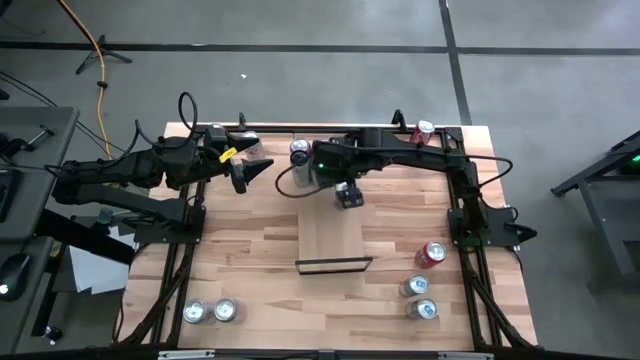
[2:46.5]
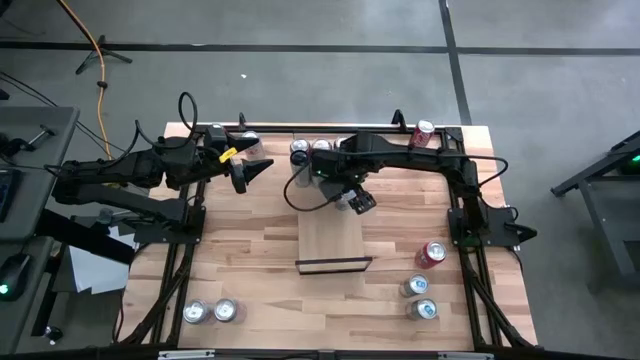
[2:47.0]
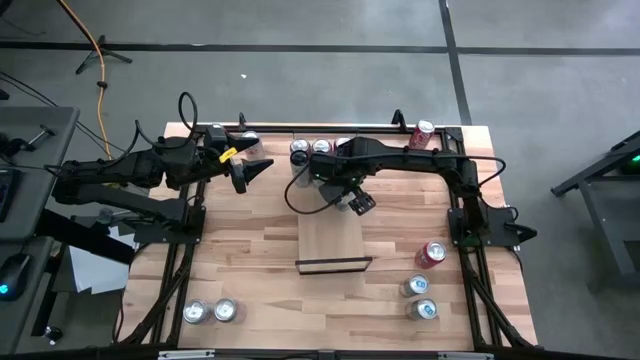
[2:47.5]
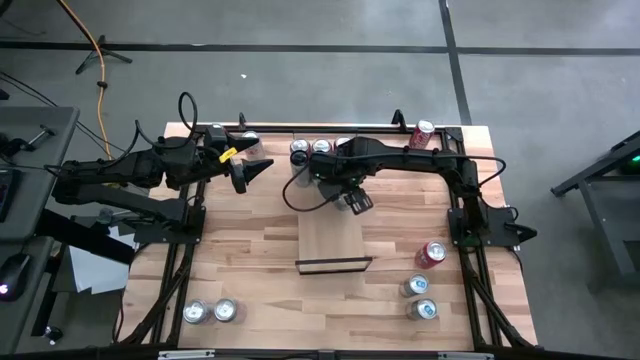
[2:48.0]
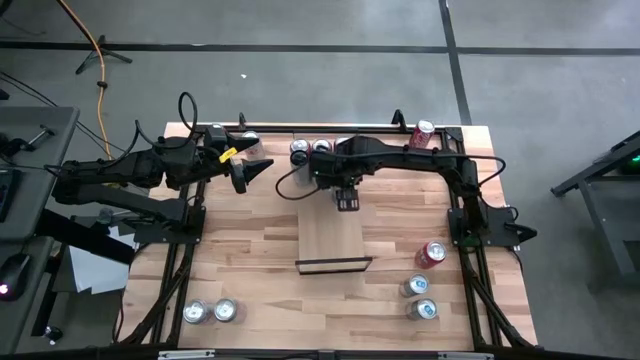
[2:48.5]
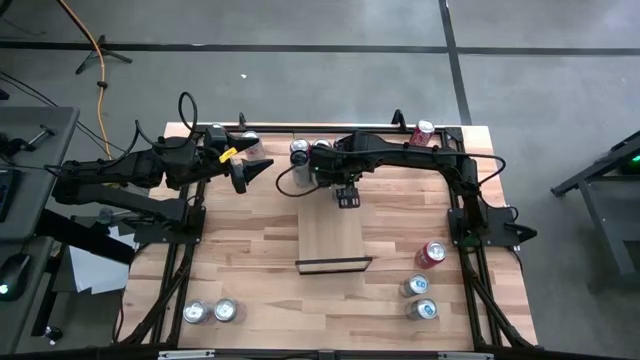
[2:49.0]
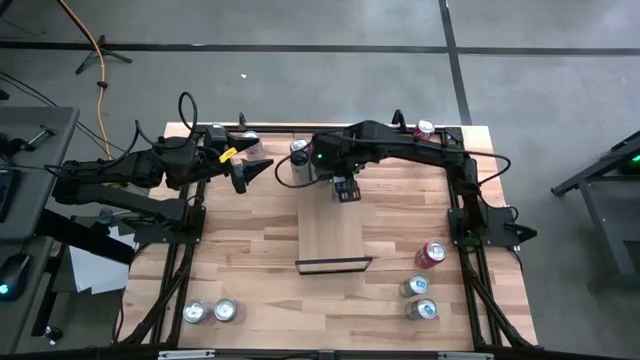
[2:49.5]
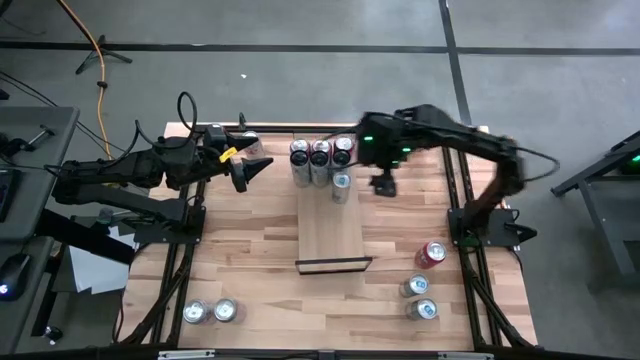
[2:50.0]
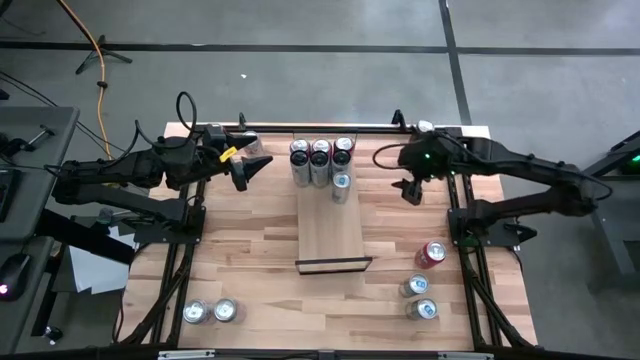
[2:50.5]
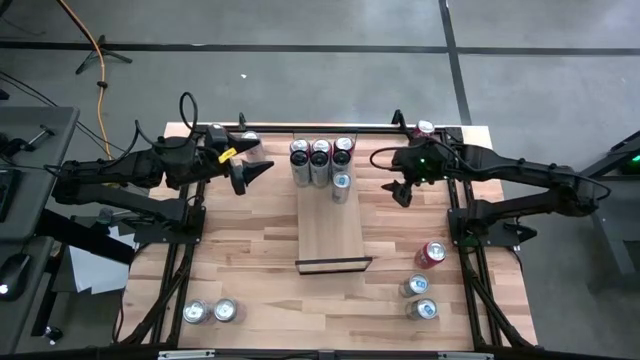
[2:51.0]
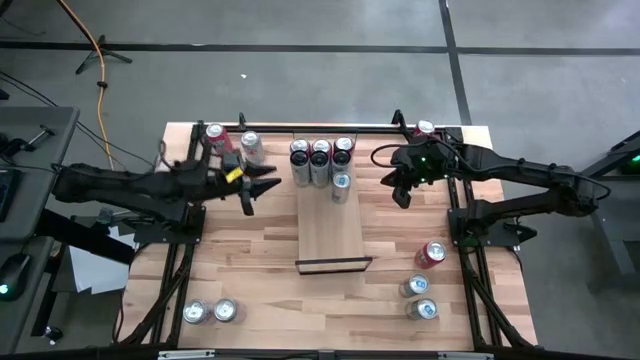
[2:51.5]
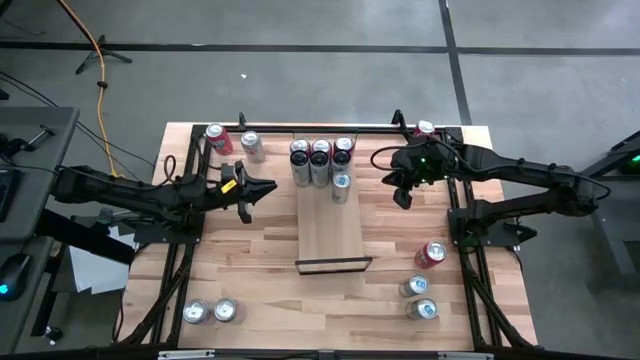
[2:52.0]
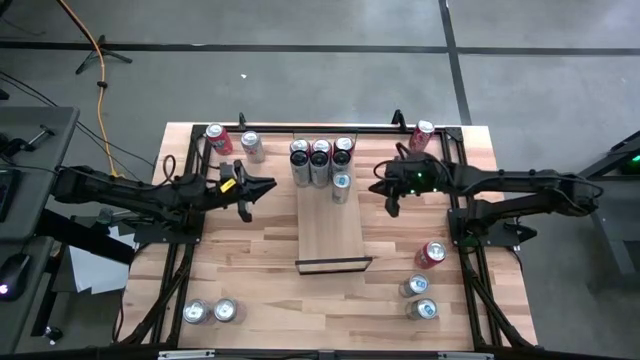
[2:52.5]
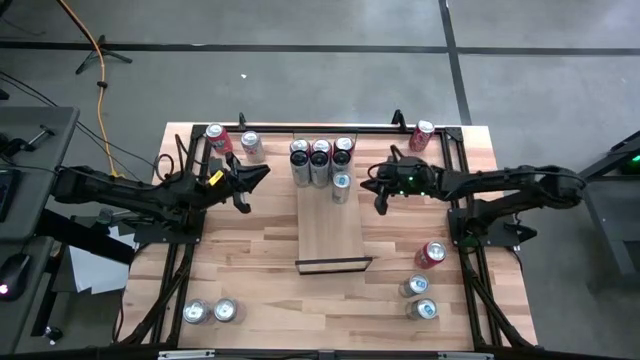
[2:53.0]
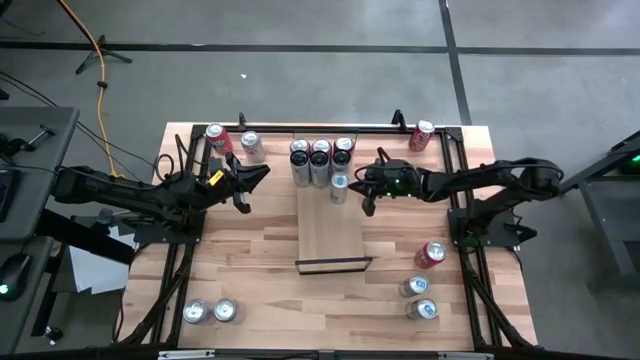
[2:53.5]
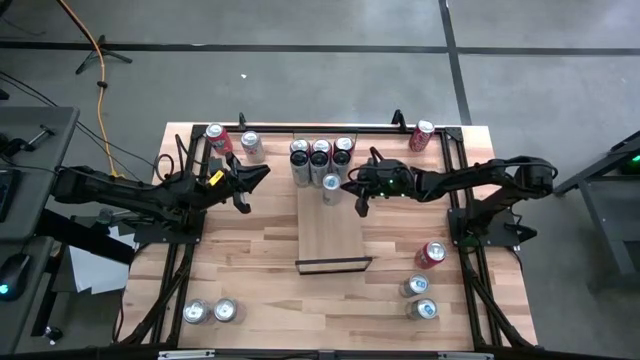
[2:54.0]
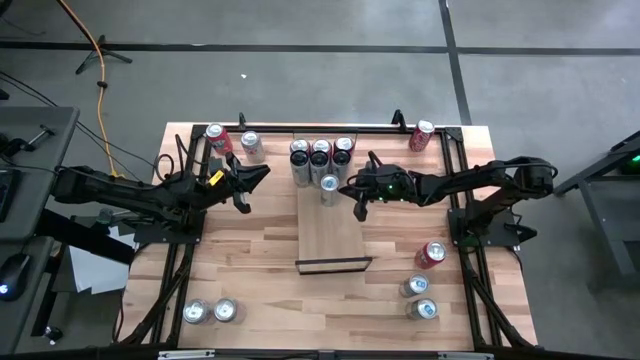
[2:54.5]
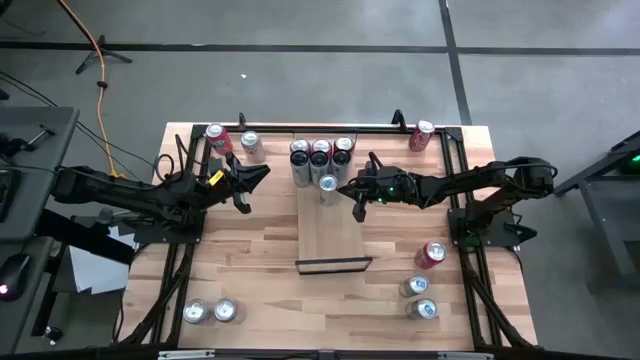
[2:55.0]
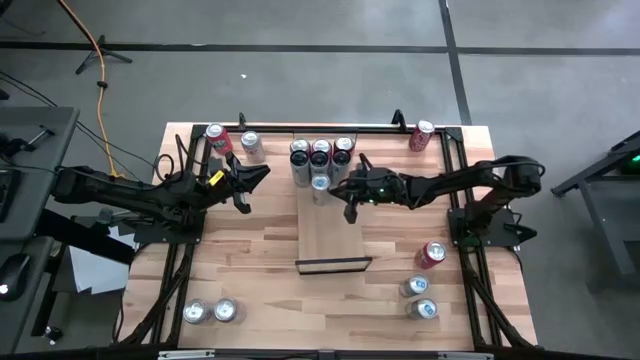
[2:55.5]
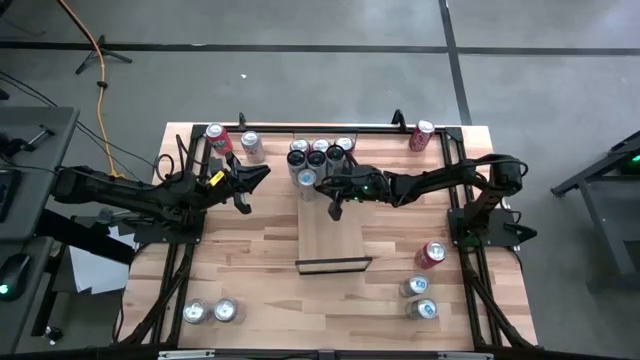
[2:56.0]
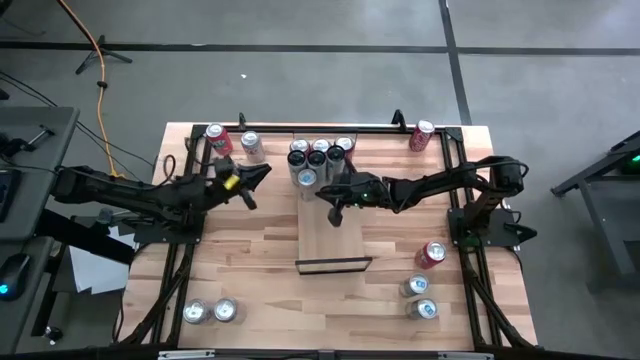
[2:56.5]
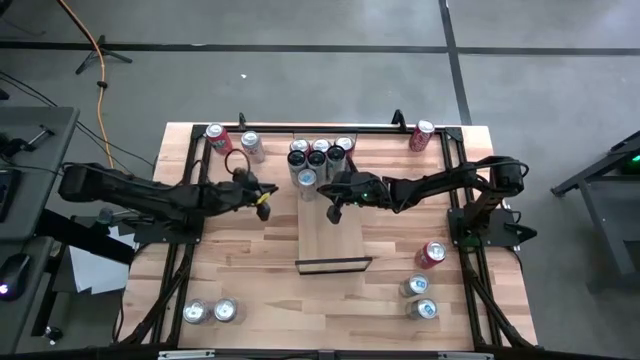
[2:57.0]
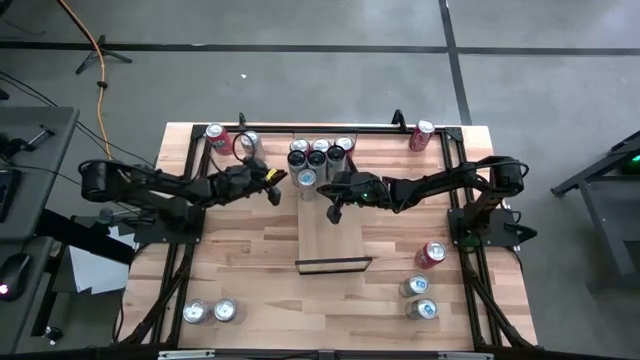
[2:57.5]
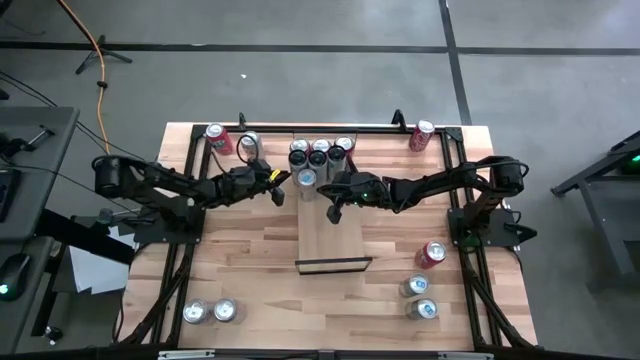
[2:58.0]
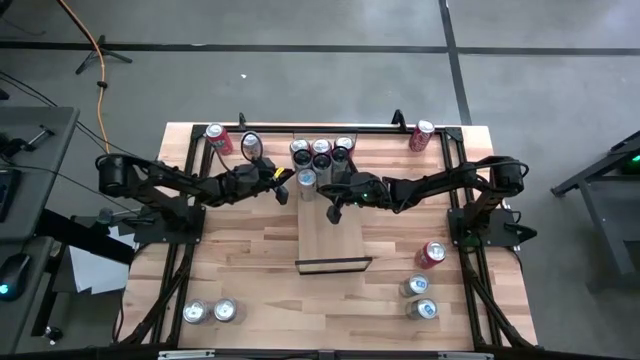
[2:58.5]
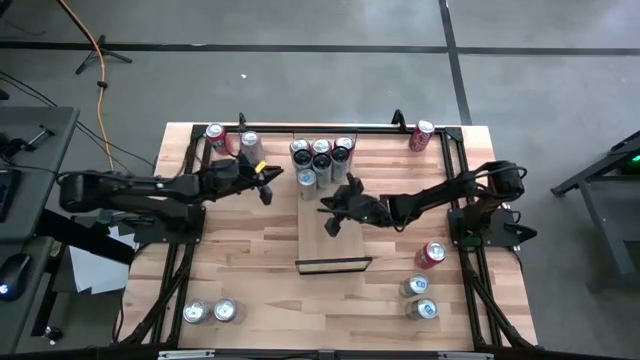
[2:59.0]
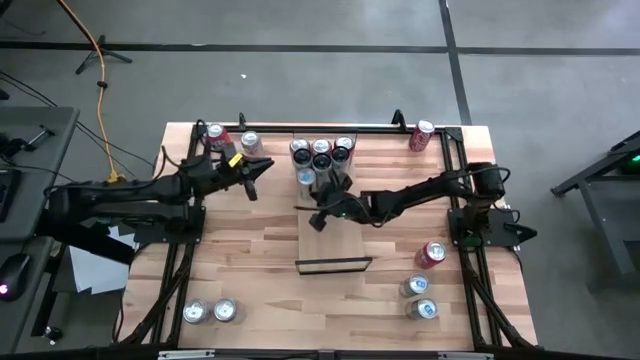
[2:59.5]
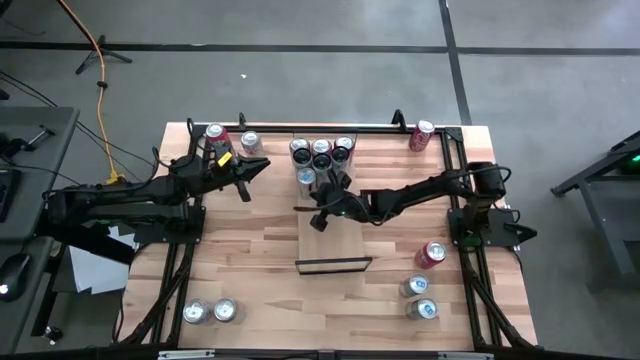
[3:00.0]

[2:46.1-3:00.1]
Task: Place canned beverage on shelf
Put the blue soda can on the shelf

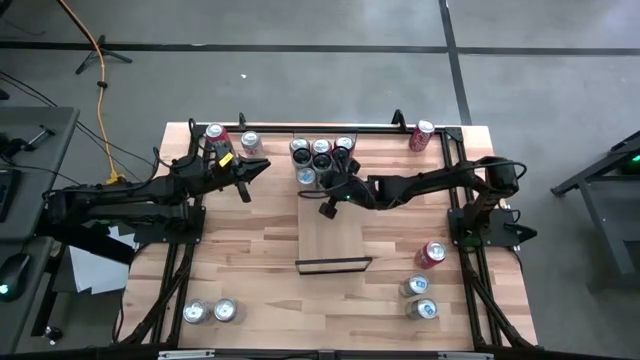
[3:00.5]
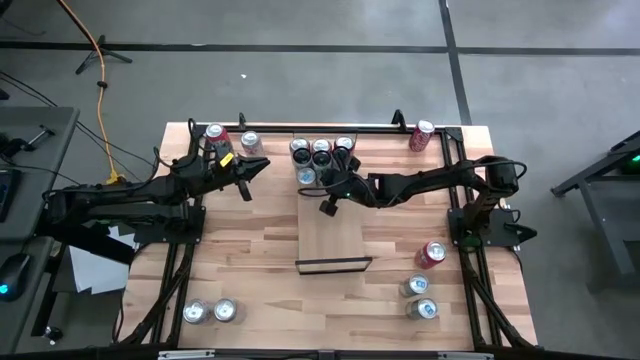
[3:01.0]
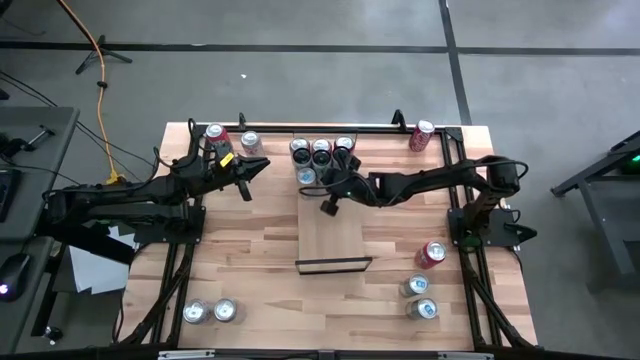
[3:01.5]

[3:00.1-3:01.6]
Adjust the black soda can

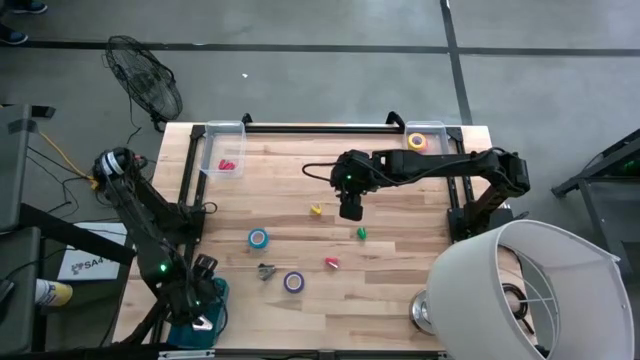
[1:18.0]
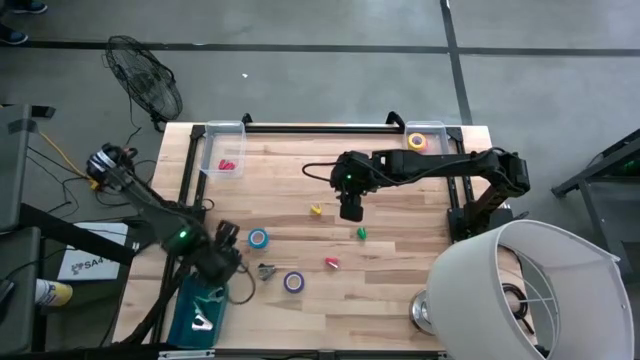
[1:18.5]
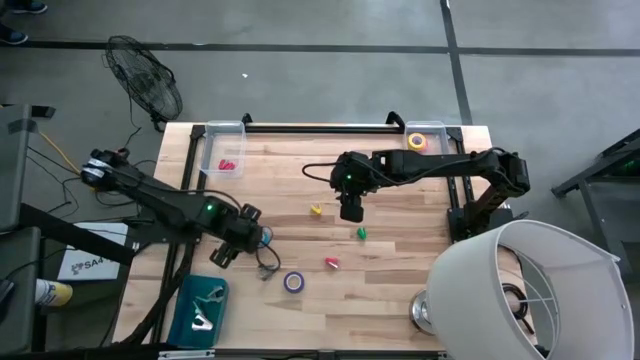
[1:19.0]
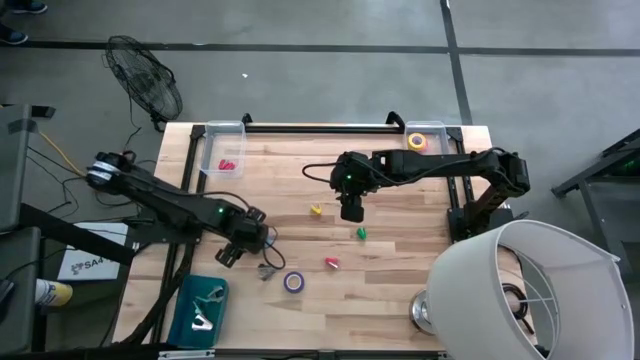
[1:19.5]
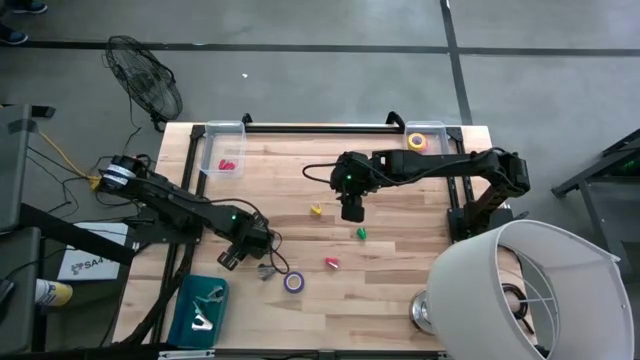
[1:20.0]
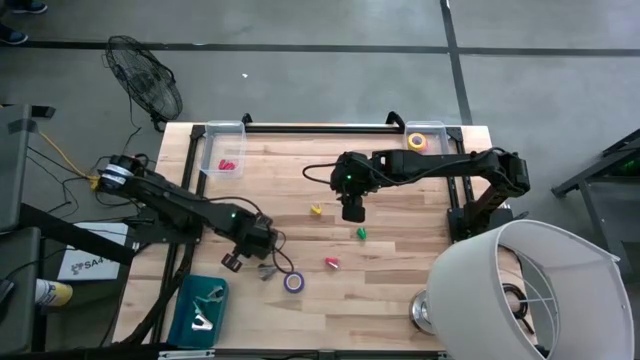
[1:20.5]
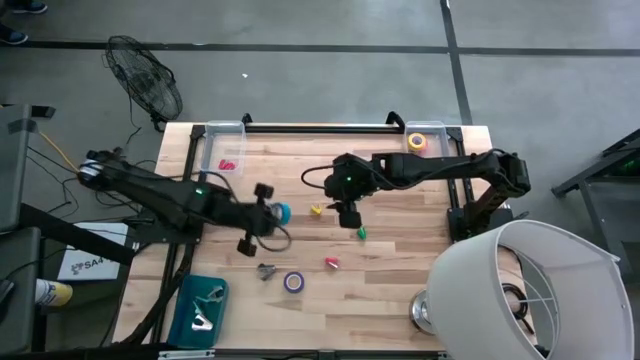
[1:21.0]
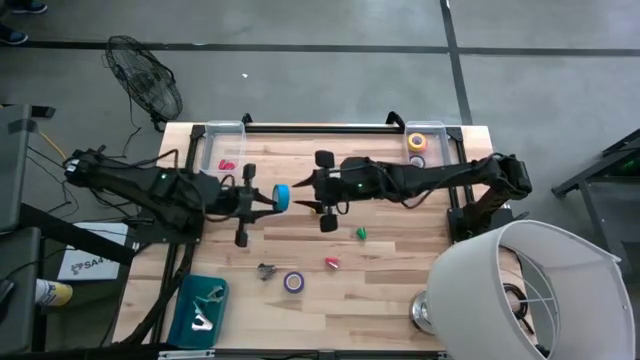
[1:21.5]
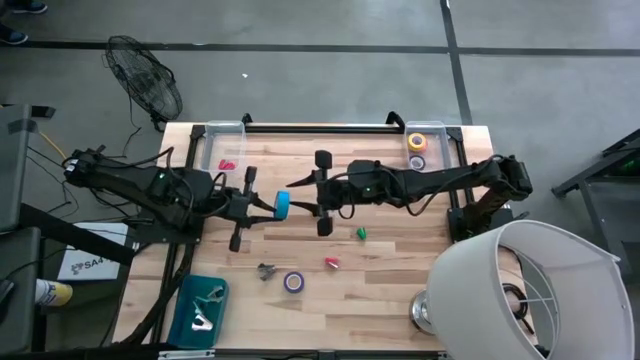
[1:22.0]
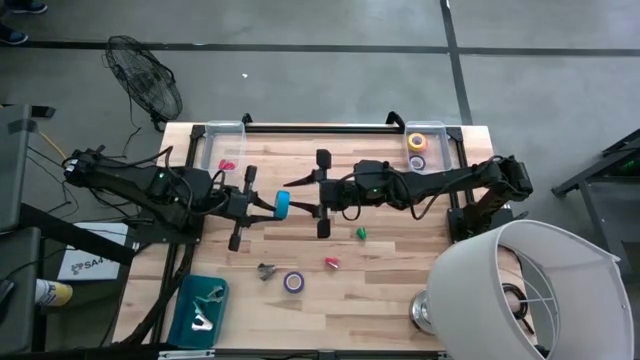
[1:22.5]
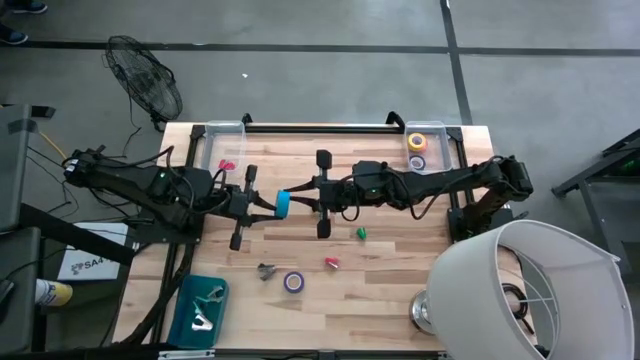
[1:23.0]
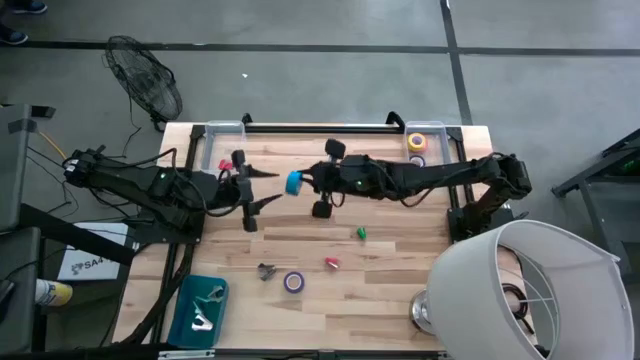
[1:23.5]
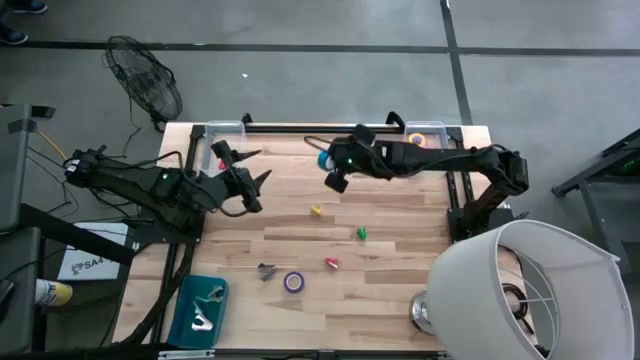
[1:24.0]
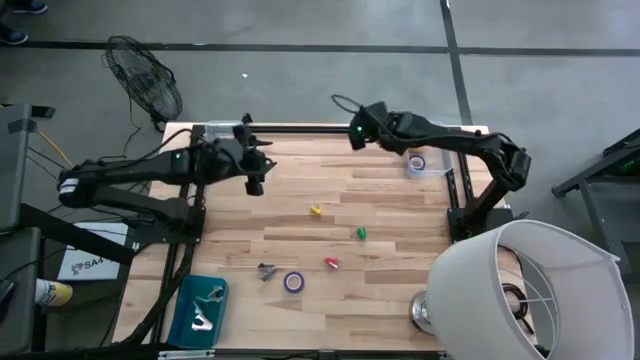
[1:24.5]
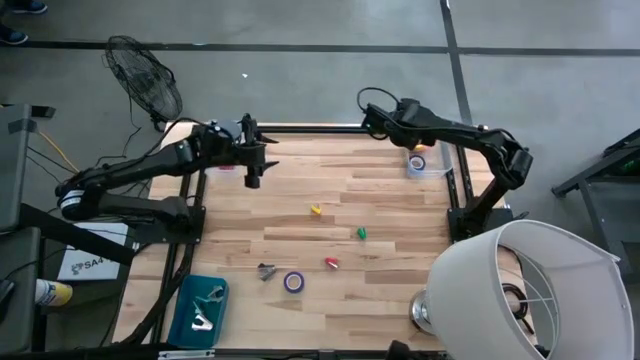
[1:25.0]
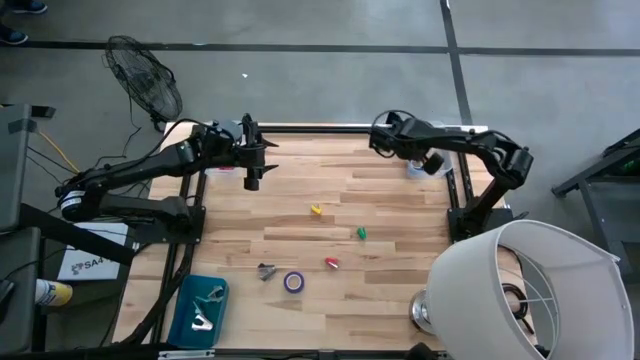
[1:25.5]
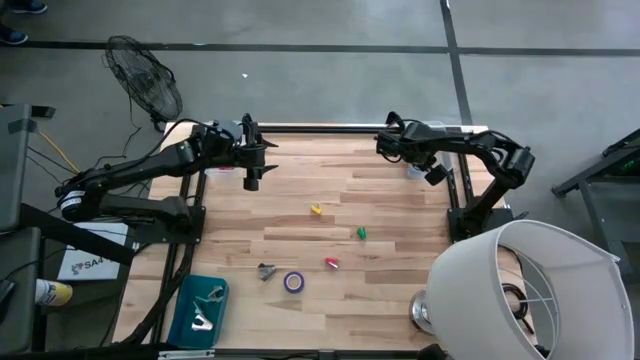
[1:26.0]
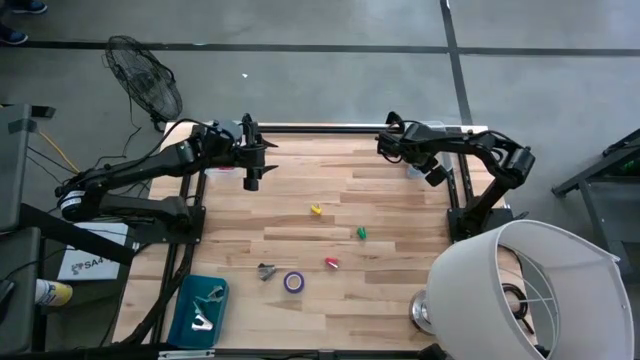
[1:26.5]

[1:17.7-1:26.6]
Task: Pick and place Stapler, Stapler remover, tape
Put the light blue tape into the right transparent bin
